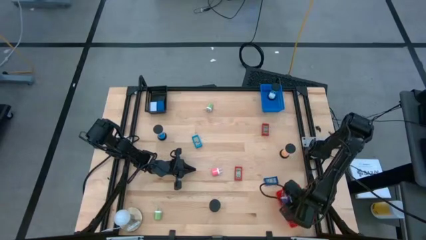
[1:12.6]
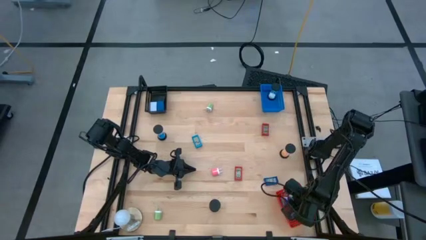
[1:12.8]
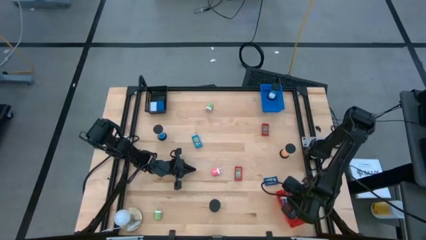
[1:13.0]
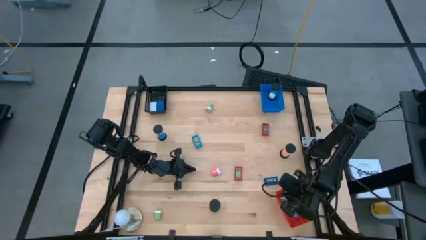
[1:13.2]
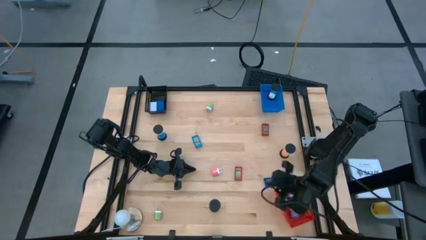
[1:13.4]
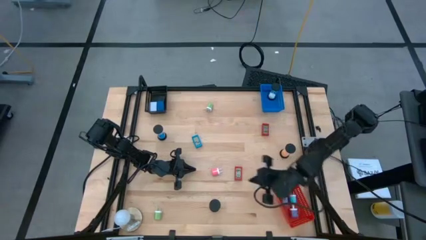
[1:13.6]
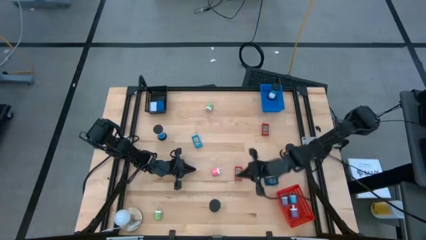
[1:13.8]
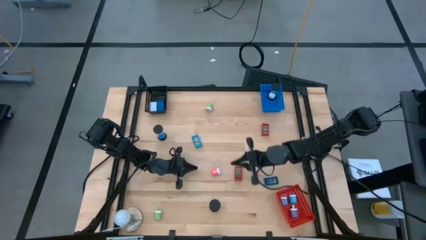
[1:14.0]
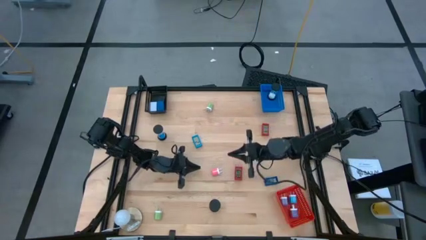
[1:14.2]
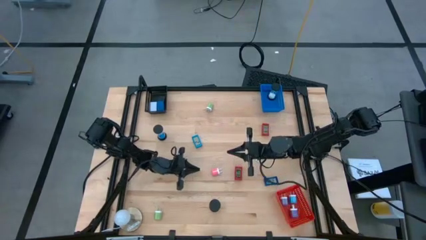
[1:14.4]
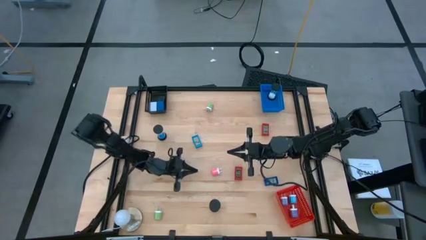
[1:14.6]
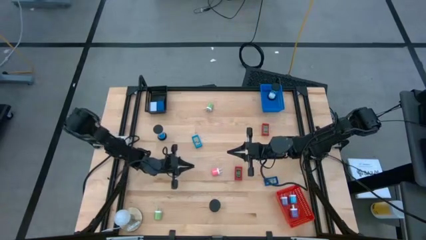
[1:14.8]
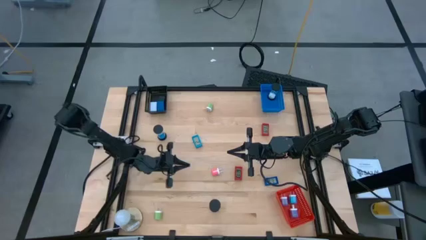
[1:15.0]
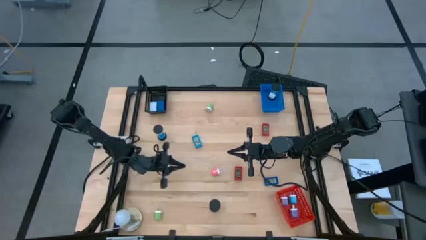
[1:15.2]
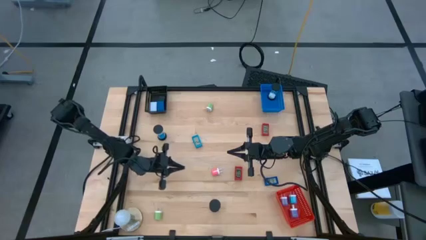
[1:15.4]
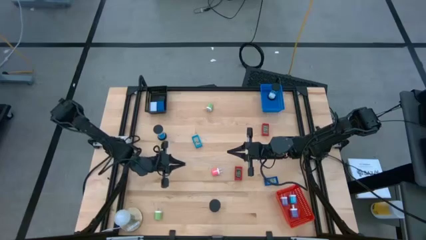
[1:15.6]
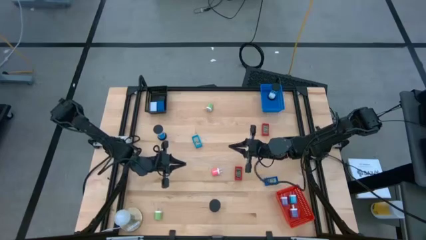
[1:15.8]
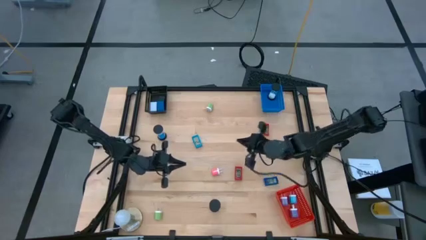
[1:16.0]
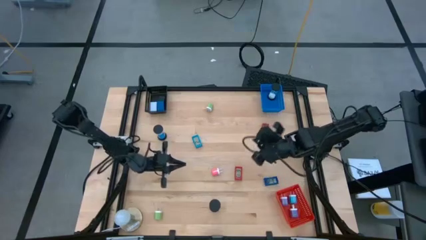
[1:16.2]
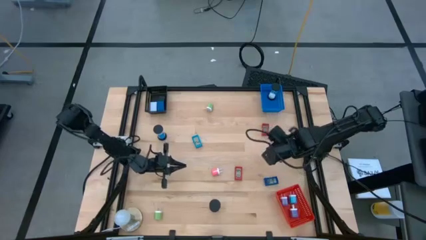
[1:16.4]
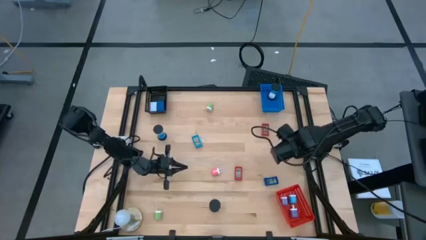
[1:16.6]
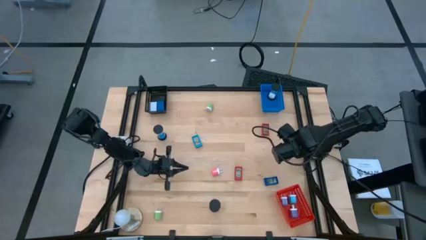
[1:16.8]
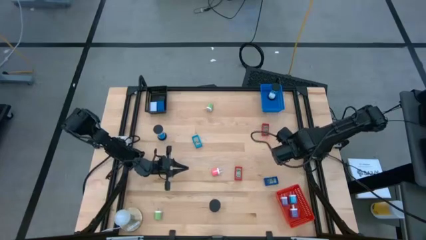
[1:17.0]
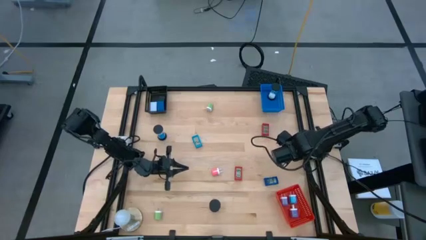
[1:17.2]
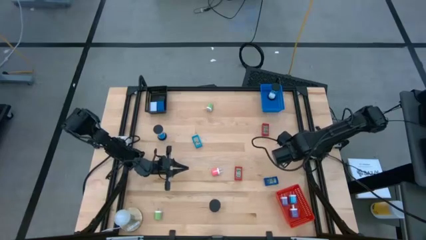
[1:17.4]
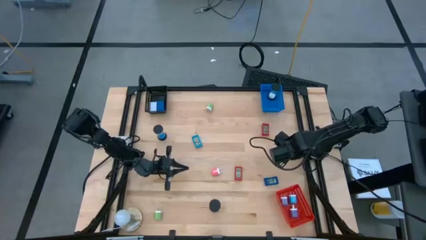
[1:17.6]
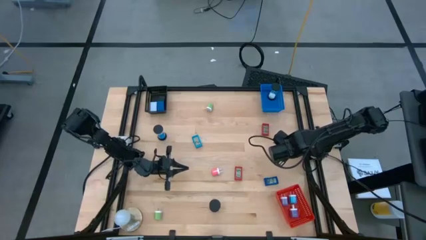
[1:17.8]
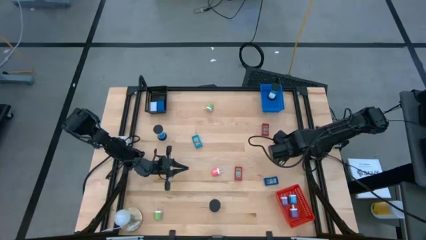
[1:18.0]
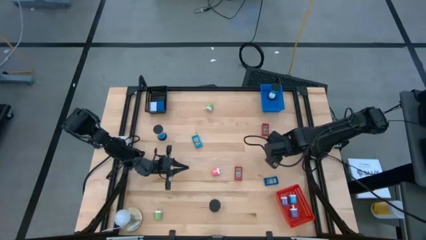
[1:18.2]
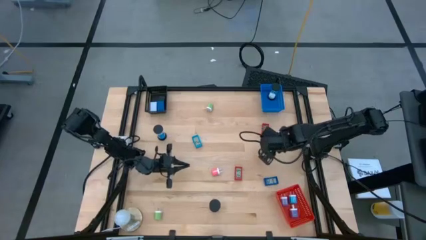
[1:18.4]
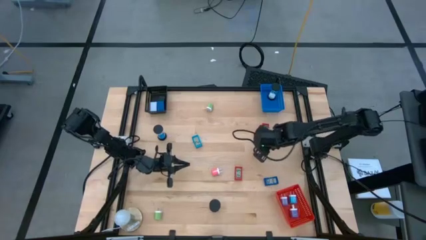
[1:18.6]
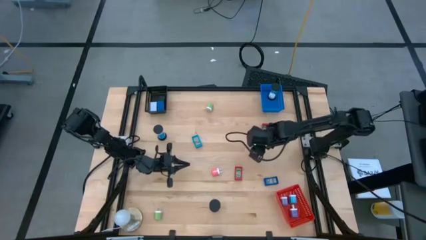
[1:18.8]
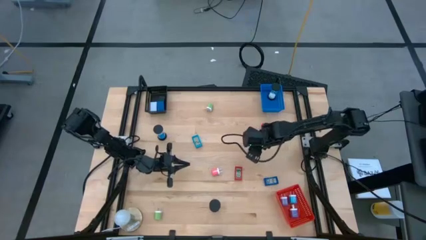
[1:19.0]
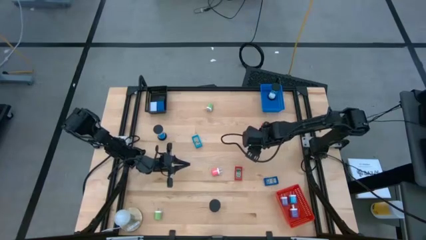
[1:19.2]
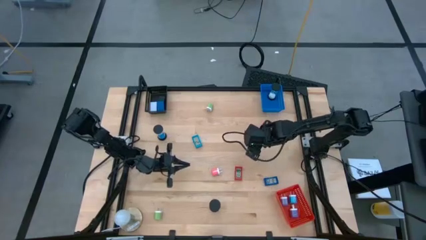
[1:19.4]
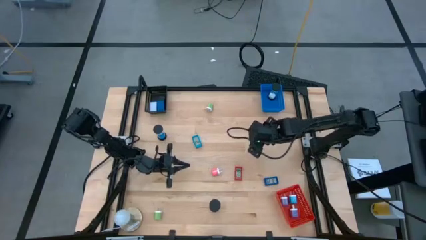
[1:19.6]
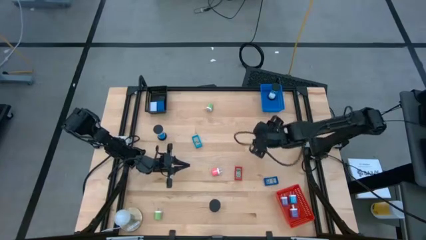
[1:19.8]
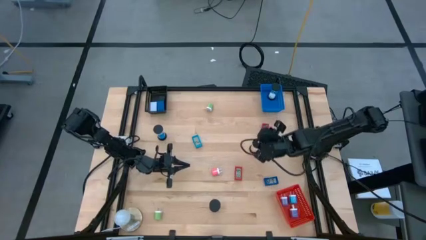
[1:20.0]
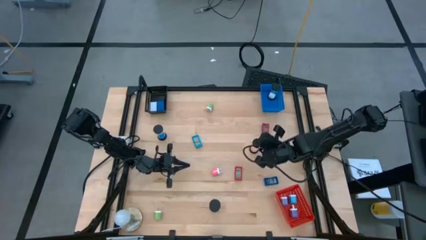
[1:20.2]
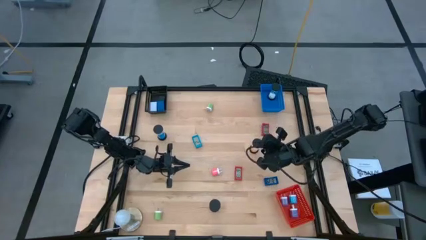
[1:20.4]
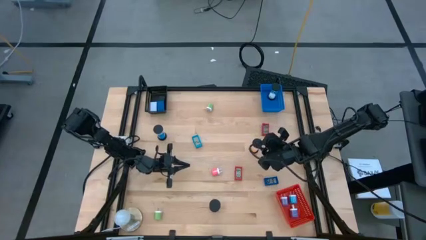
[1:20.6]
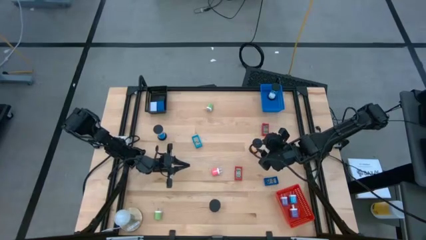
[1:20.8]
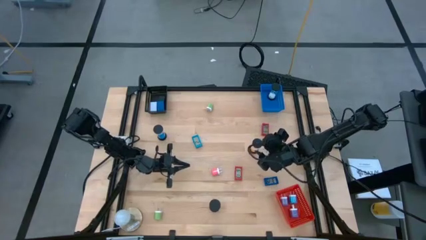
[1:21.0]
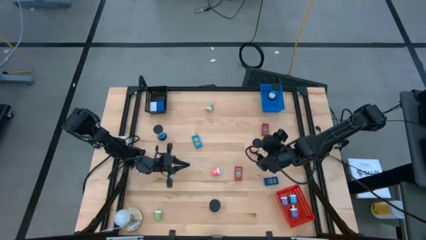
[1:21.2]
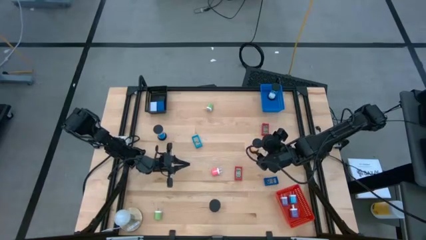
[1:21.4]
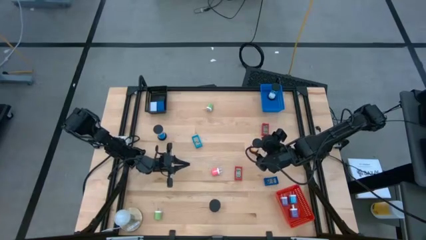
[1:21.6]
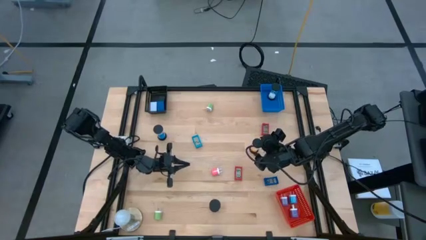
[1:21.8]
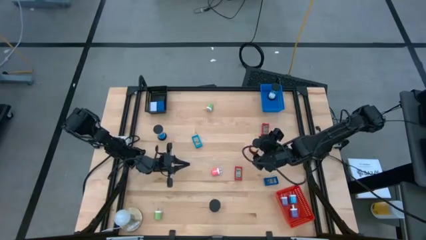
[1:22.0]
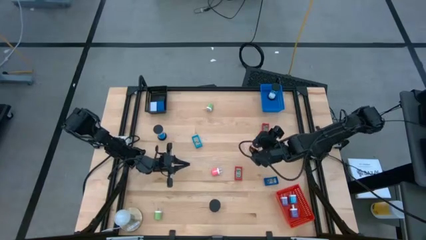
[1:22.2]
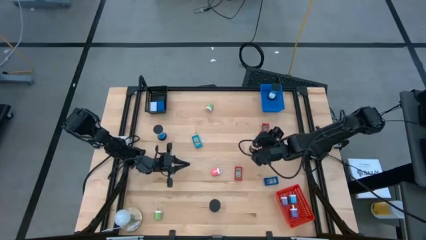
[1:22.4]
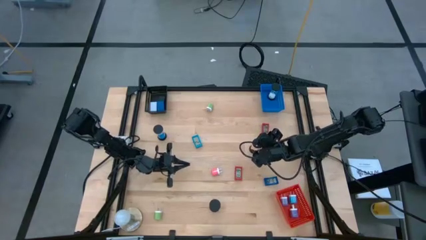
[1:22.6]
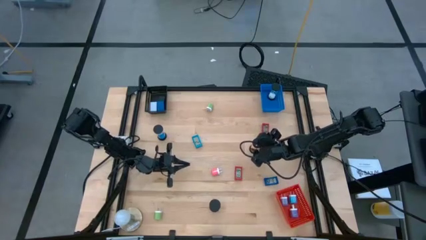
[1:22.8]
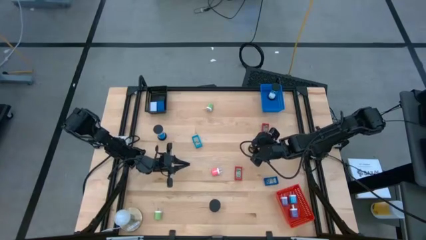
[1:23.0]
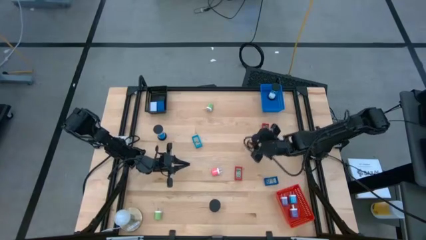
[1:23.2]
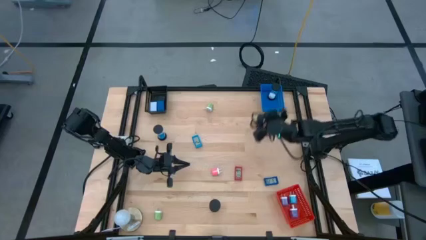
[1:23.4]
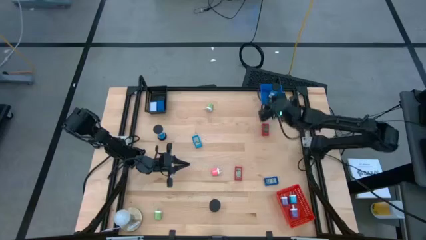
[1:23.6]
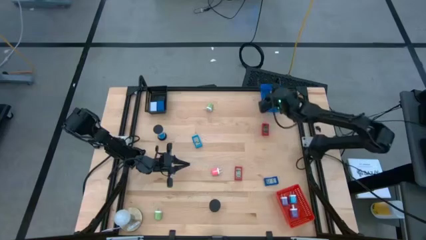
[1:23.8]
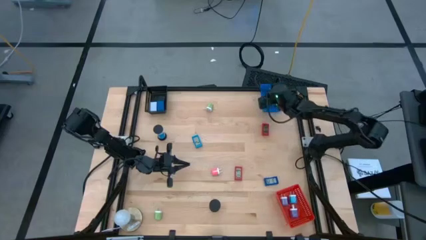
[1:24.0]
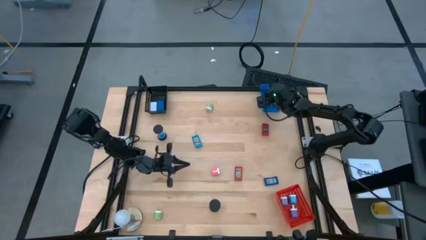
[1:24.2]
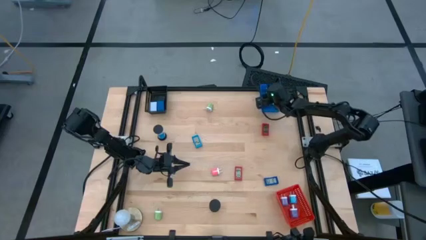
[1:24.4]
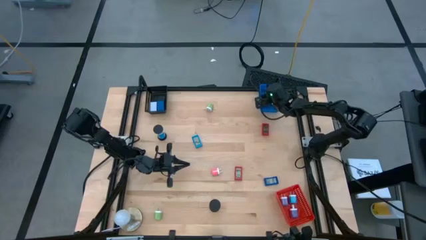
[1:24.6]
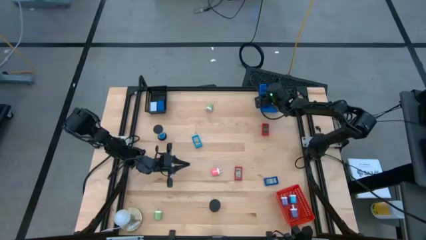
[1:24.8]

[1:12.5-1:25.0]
Task: Pick & Place Office items
Put the orange sand timer into the blue basket

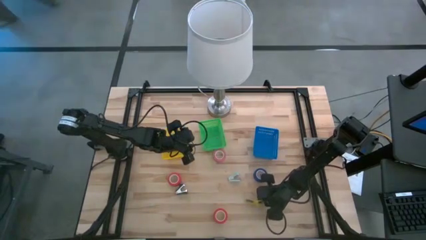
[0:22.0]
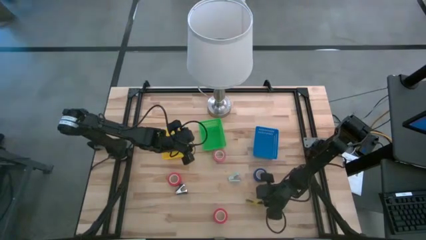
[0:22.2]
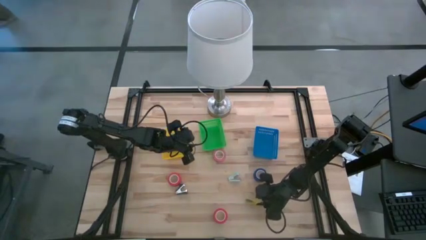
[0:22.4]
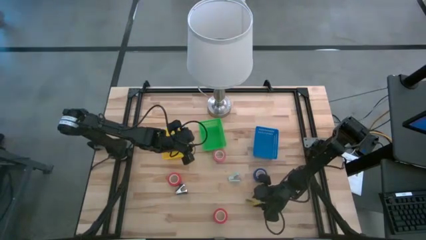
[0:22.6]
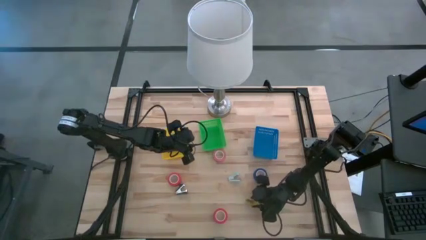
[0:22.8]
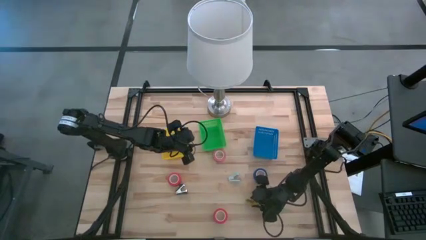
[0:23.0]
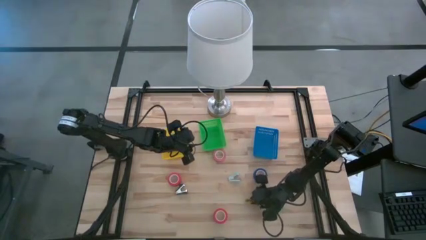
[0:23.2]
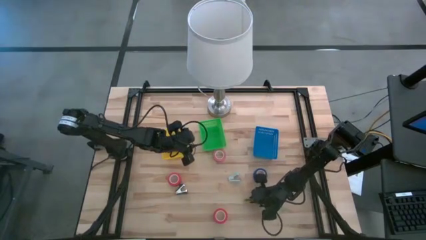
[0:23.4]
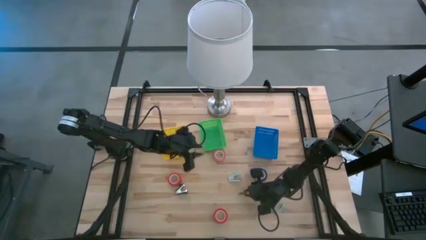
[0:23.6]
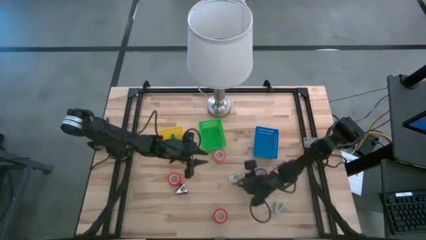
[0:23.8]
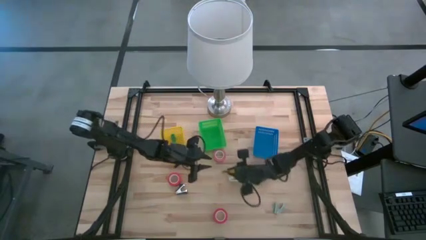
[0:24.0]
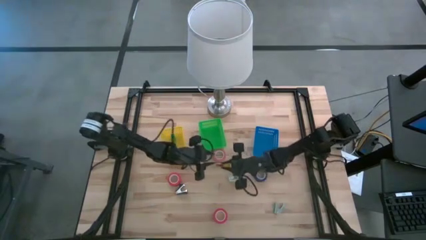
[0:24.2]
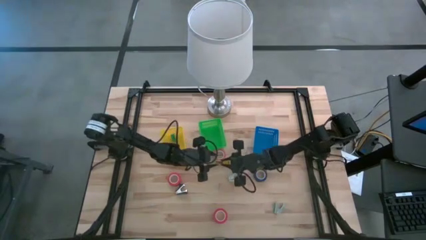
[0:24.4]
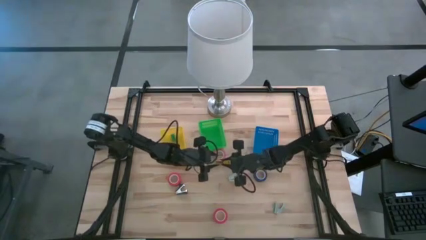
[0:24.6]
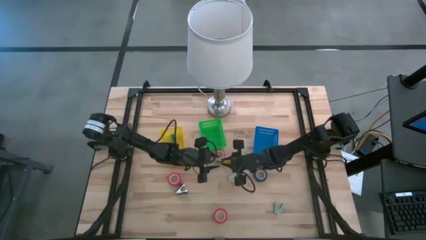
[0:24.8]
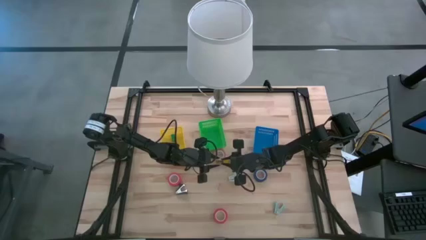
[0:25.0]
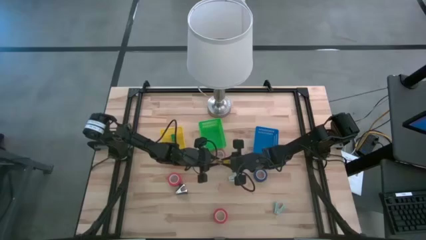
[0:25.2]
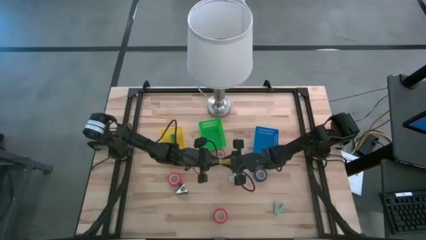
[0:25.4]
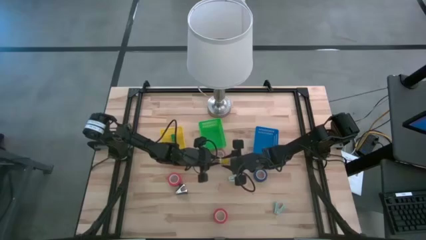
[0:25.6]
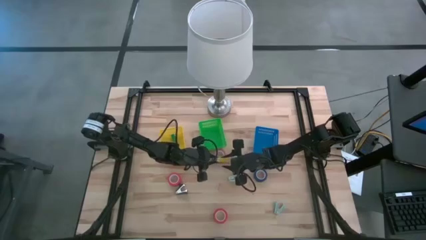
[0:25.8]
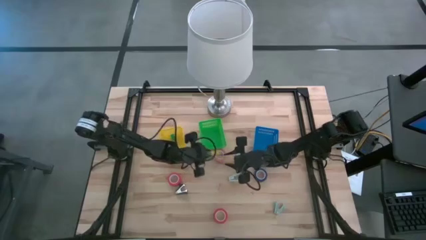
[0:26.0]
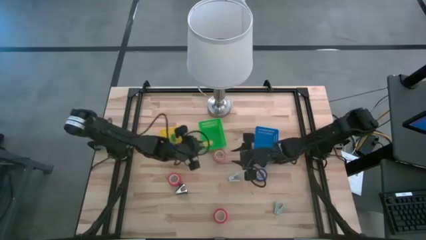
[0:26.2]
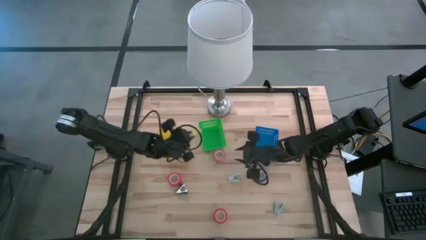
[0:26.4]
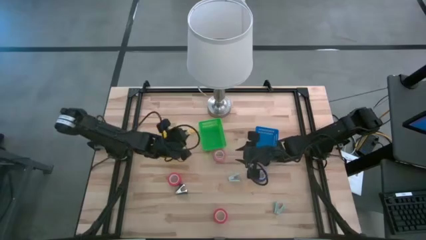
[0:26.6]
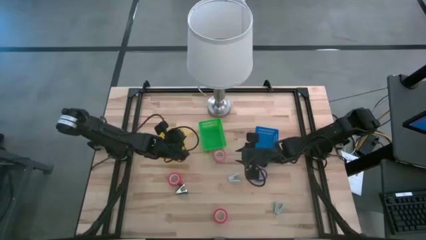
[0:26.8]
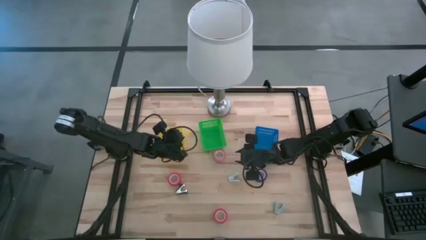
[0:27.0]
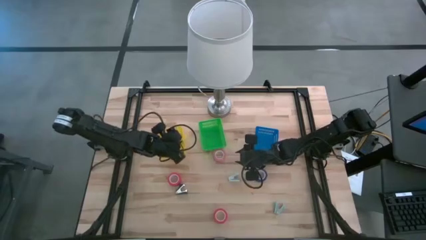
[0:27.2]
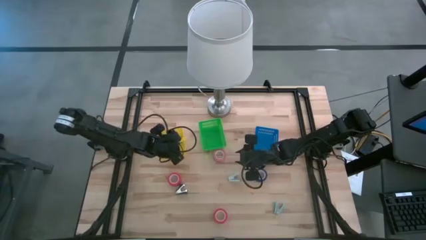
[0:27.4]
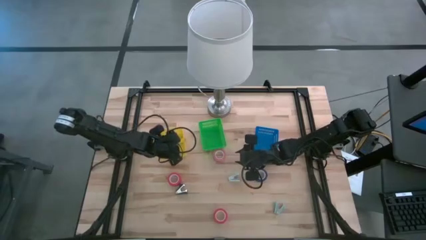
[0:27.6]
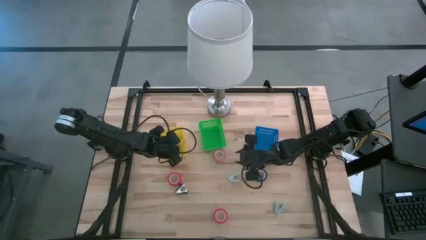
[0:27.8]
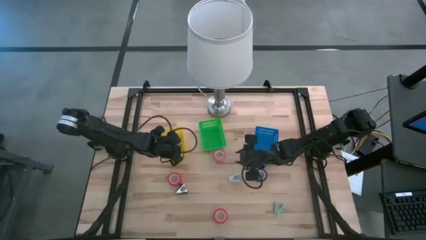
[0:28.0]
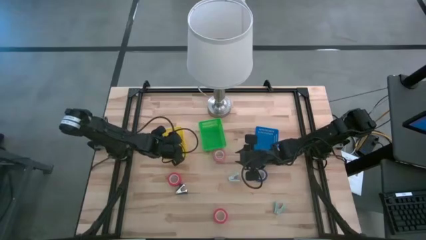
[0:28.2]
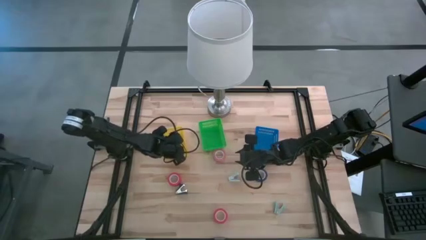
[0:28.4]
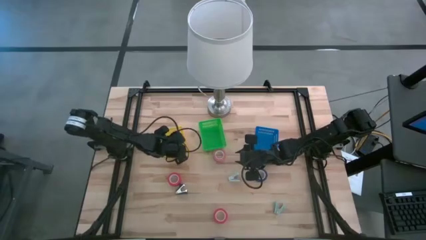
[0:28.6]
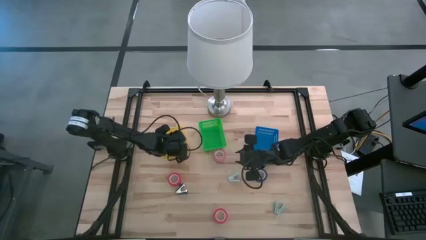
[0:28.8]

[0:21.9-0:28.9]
Task: Pick and place Stapler, Stapler remover, tape
Put the yellow stapler into the yellow bin
